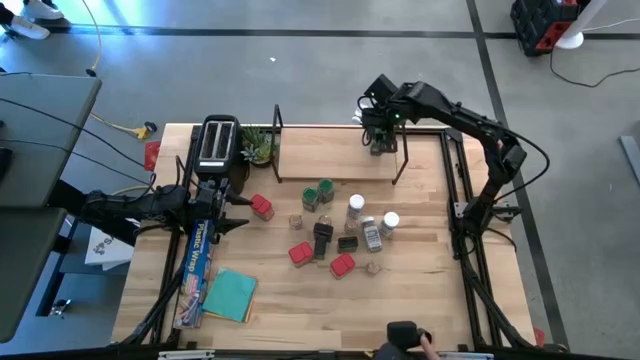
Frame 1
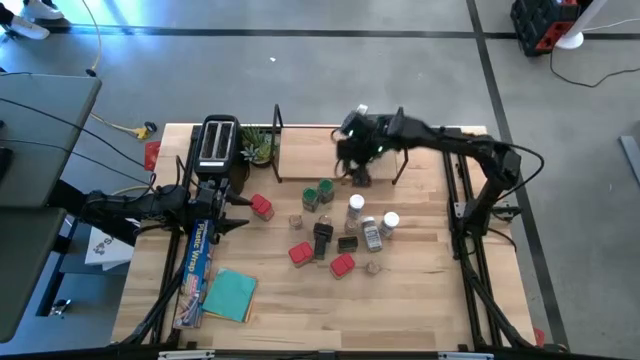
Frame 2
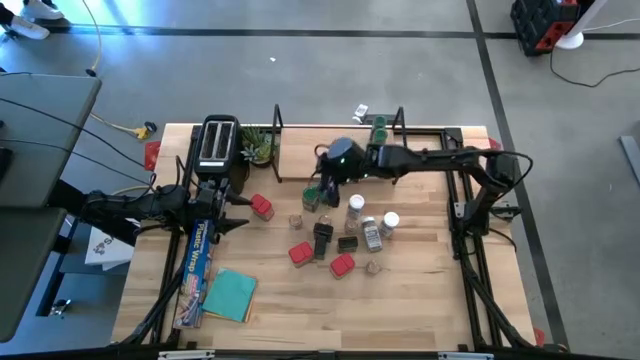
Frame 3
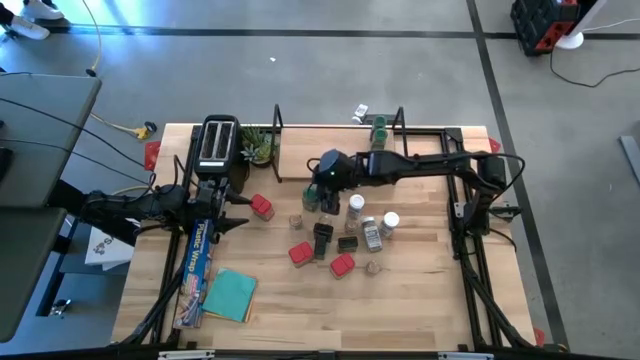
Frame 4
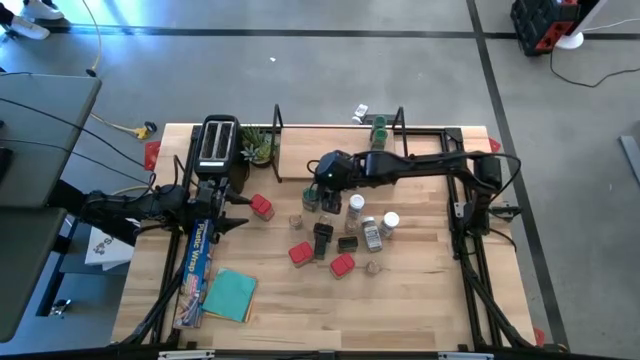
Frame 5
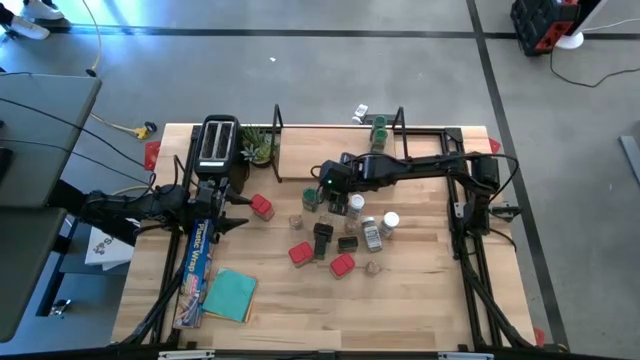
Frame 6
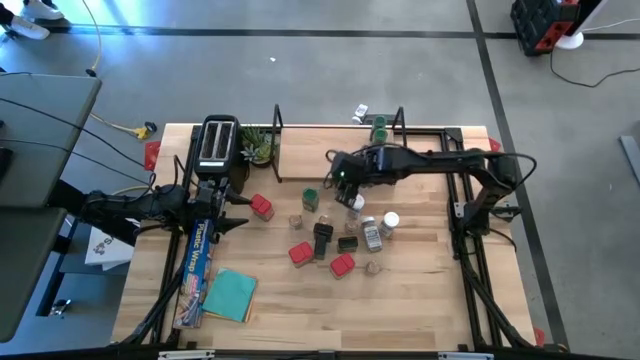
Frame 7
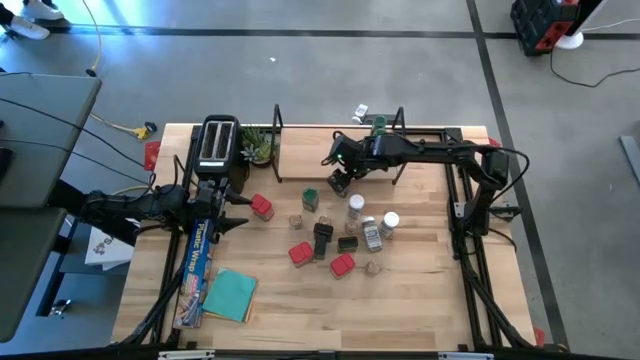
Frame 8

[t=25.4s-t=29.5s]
Task: Shelf spices
Put the top green seasoning bottle on the shelf aligned with the other green seasoning bottles

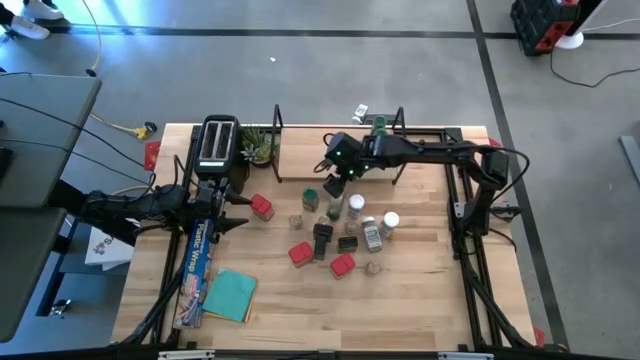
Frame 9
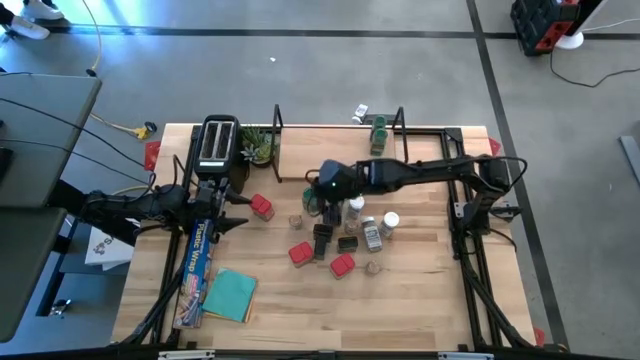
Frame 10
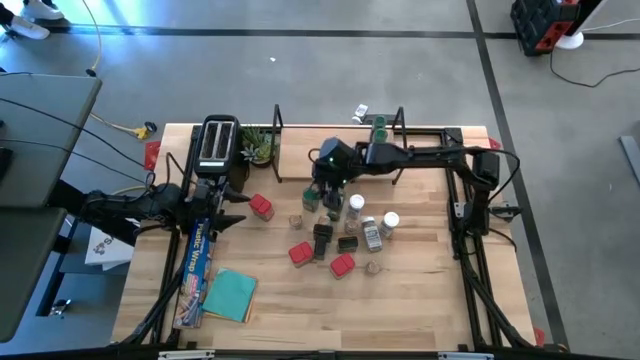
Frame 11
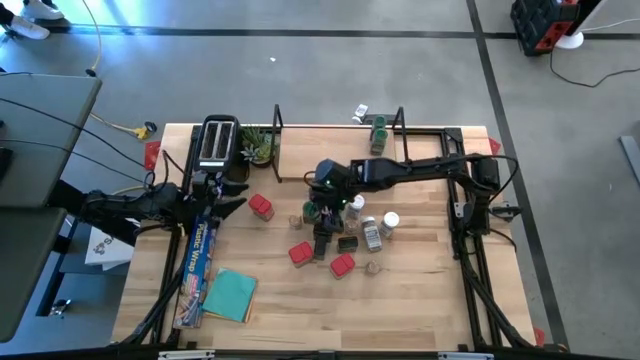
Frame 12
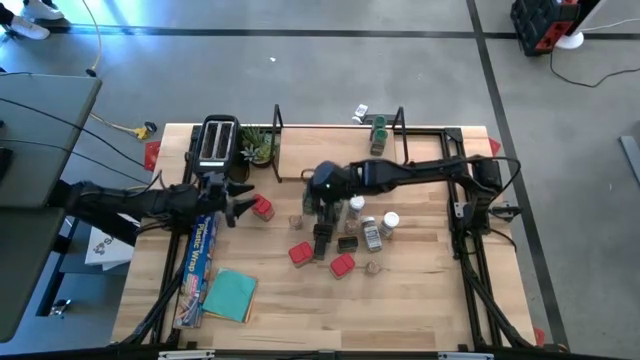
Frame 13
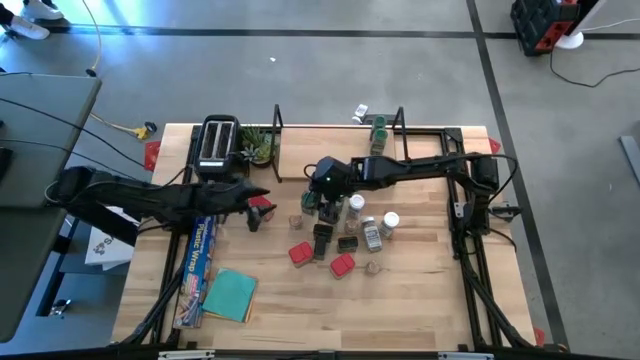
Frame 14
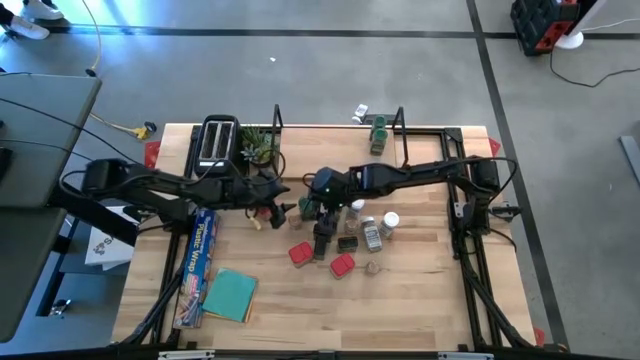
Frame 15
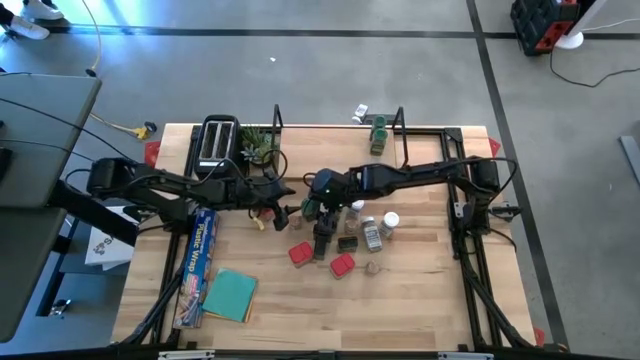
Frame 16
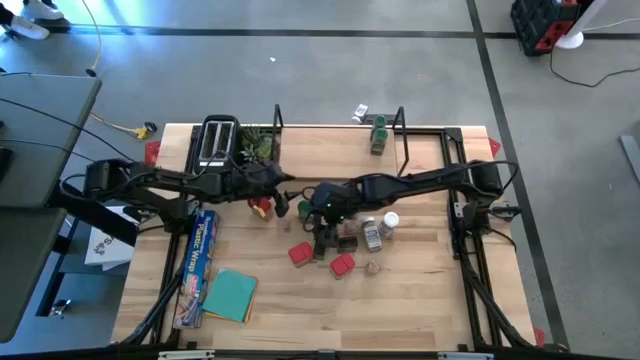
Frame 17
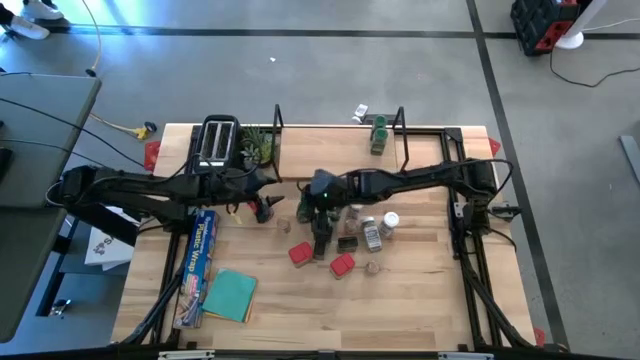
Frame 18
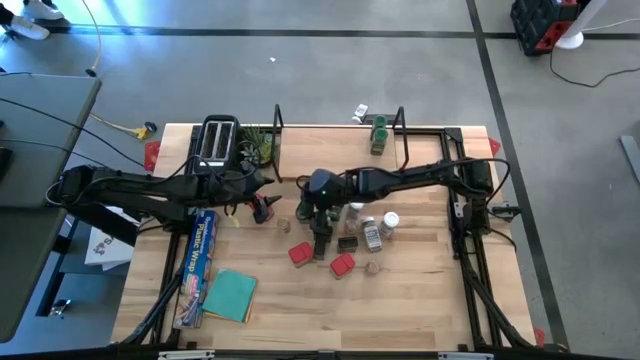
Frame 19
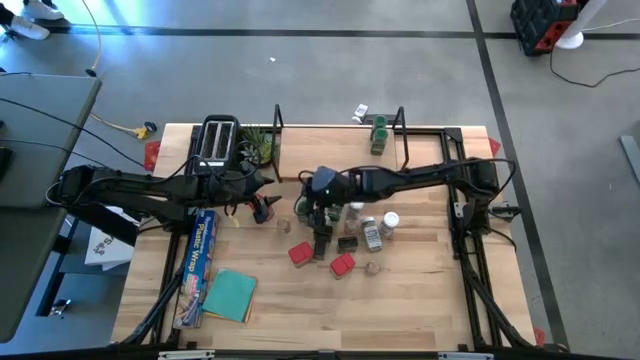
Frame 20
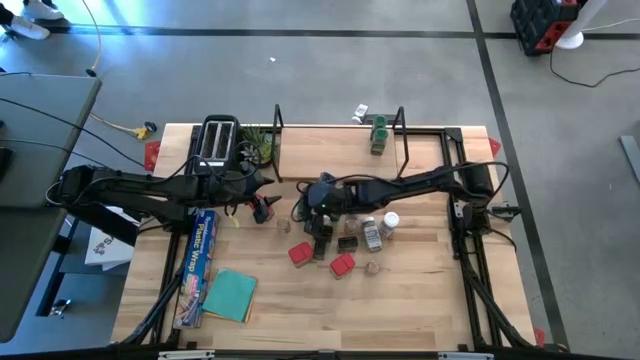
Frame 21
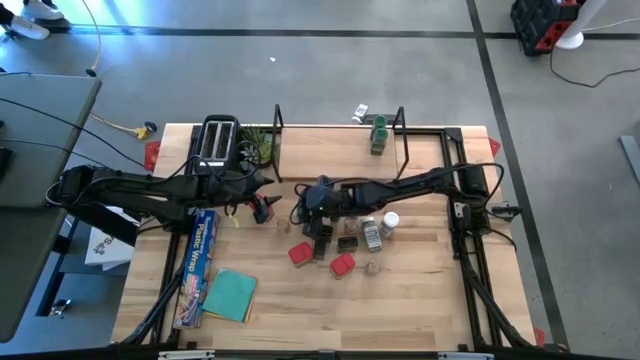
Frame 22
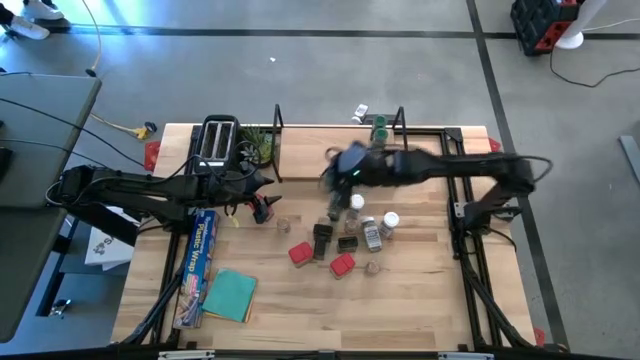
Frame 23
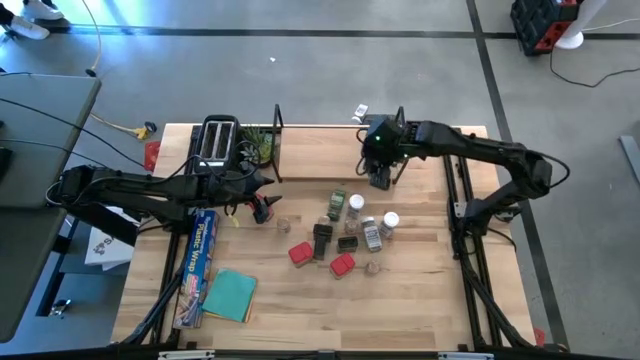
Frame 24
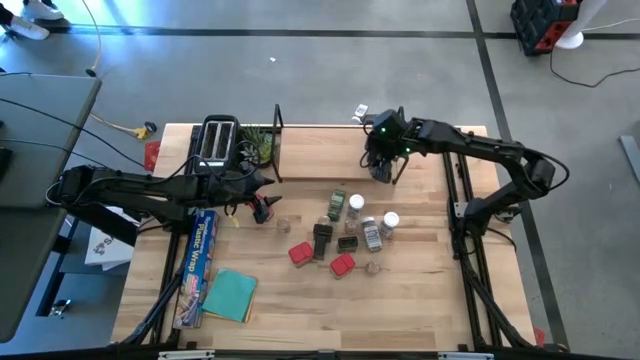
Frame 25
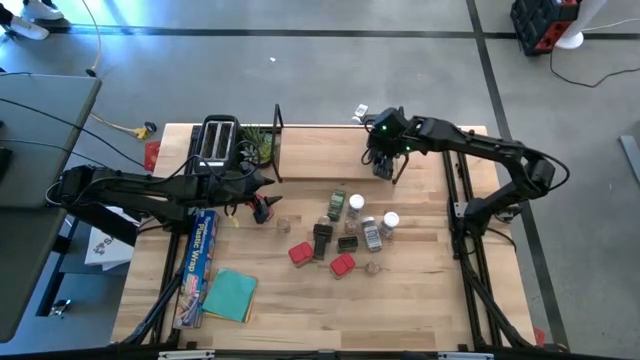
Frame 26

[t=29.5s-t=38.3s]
Put the left green seasoning bottle on the shelf aligned with the other green seasoning bottles

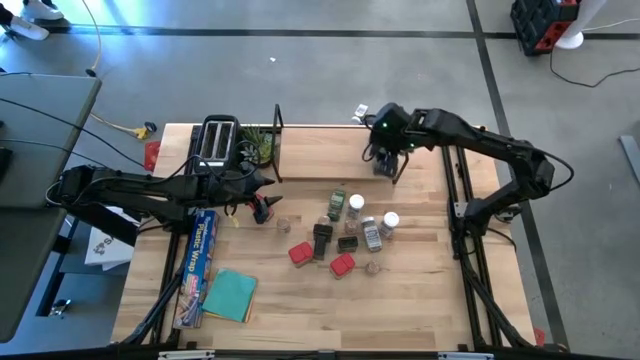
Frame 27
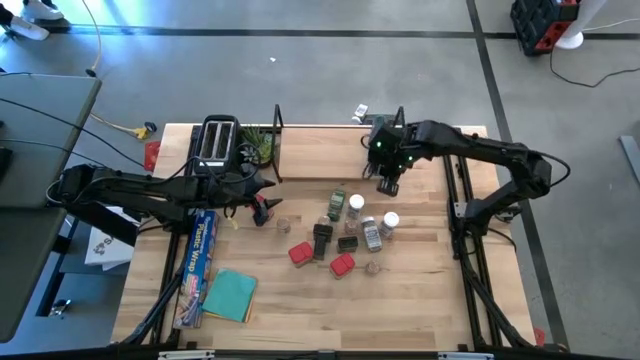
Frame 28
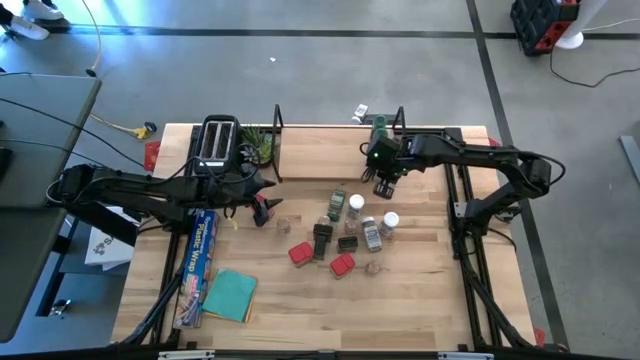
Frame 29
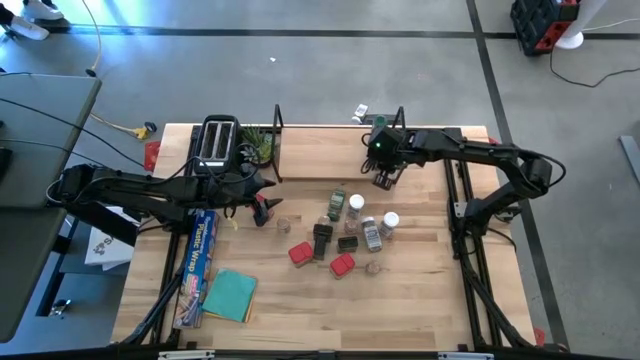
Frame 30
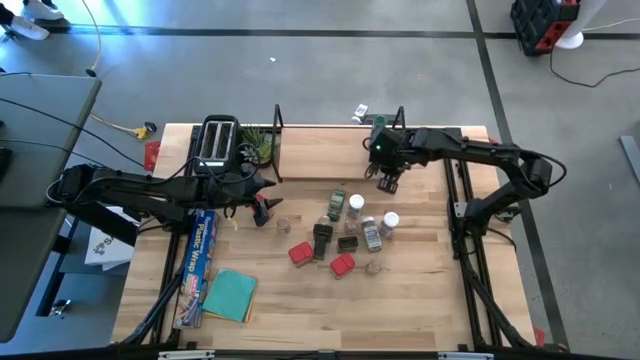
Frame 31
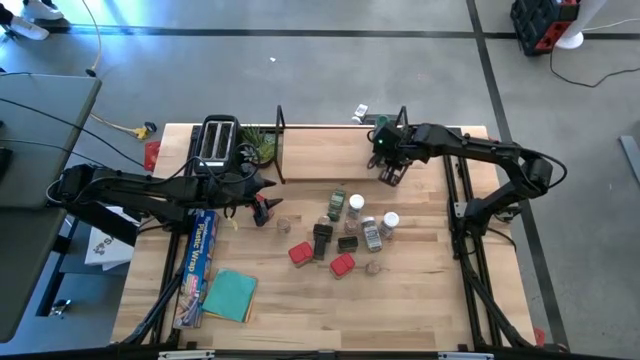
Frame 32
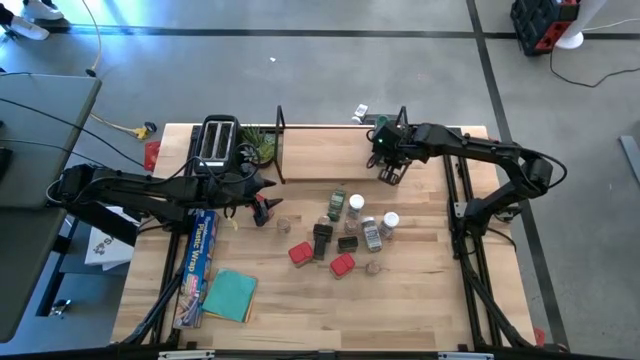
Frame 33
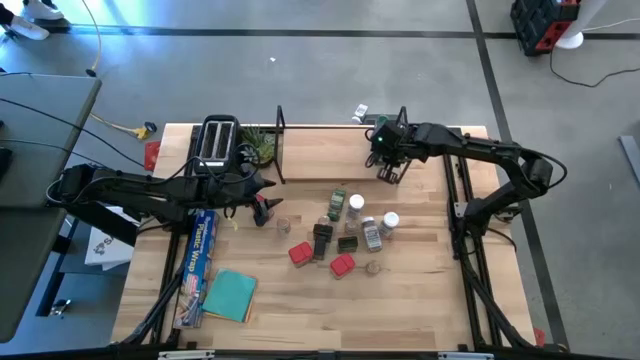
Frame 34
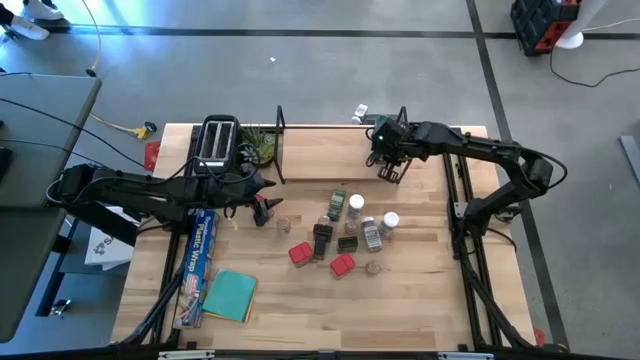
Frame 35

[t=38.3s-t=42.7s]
Adjust the green seasoning bottle

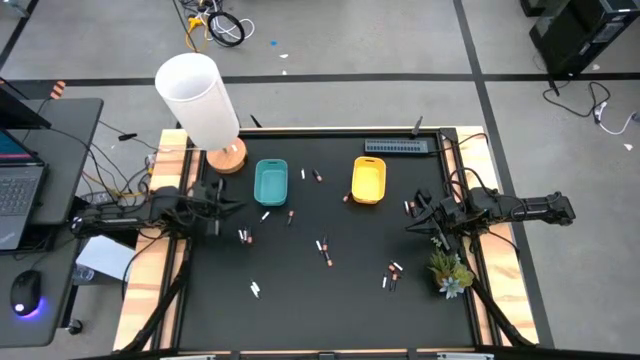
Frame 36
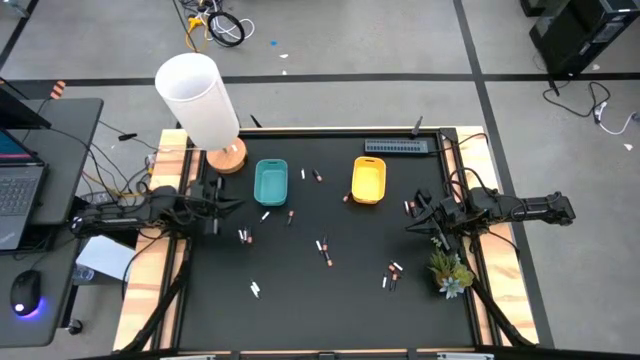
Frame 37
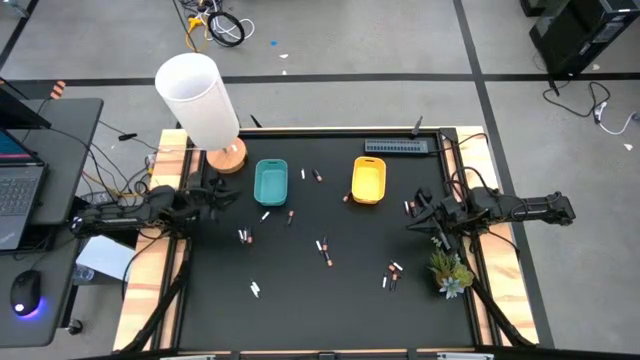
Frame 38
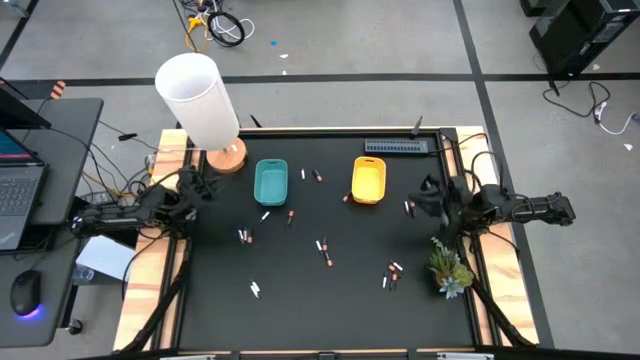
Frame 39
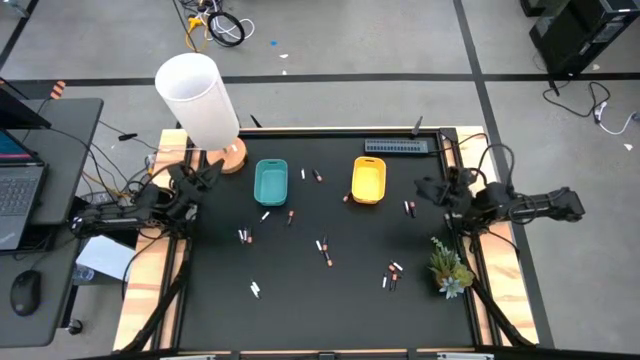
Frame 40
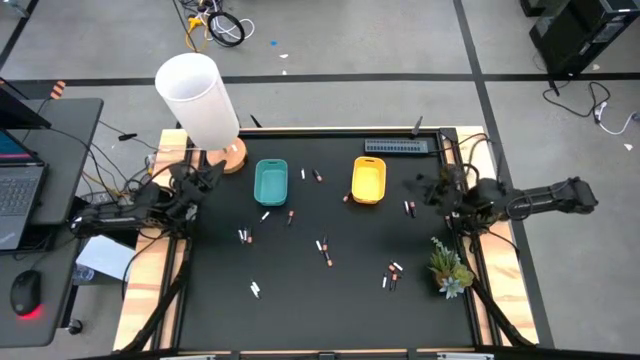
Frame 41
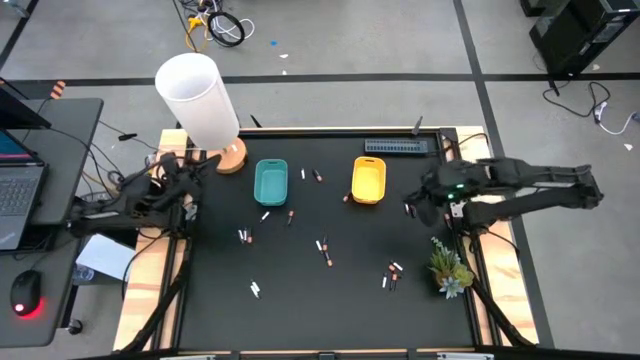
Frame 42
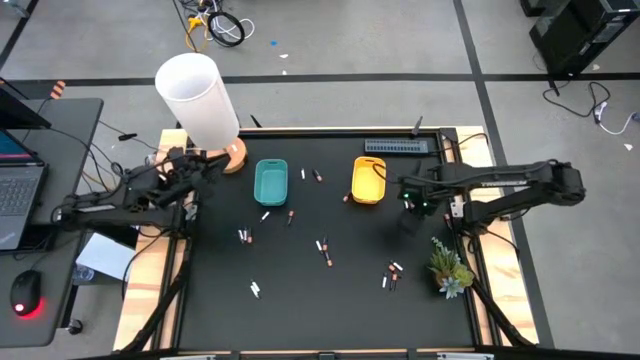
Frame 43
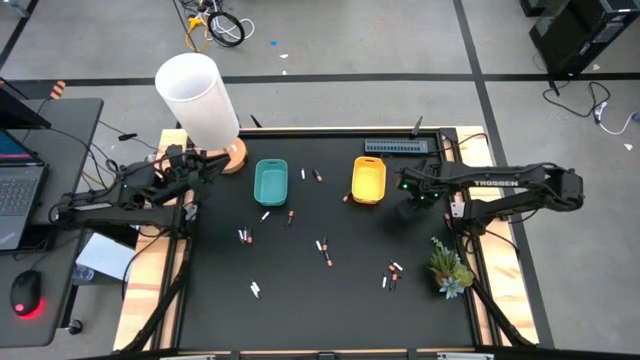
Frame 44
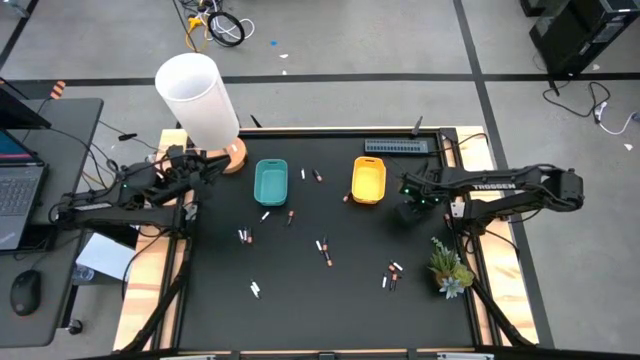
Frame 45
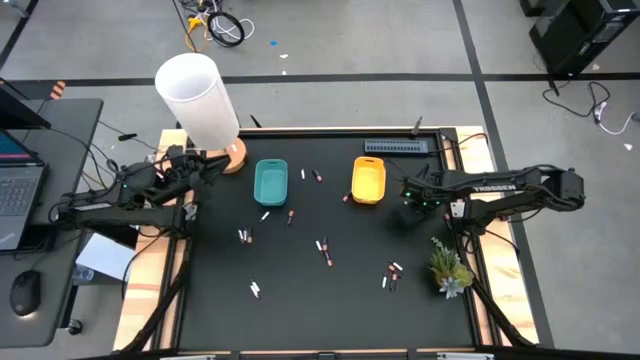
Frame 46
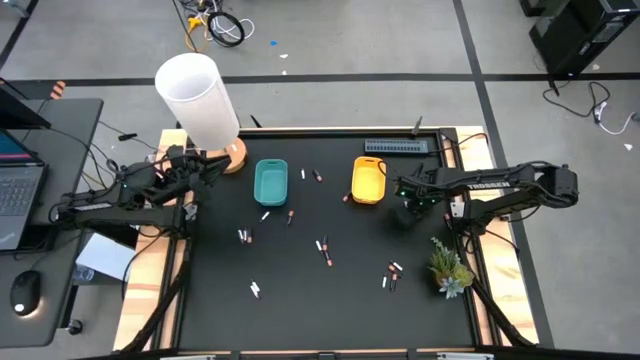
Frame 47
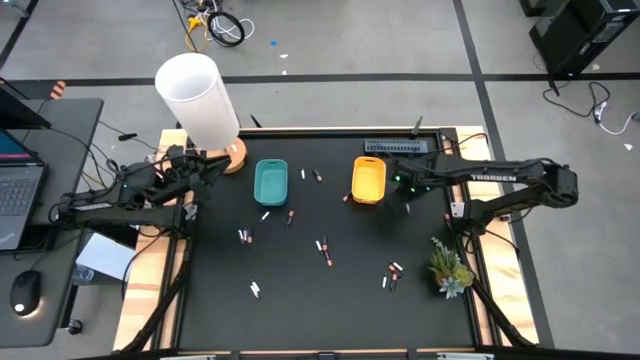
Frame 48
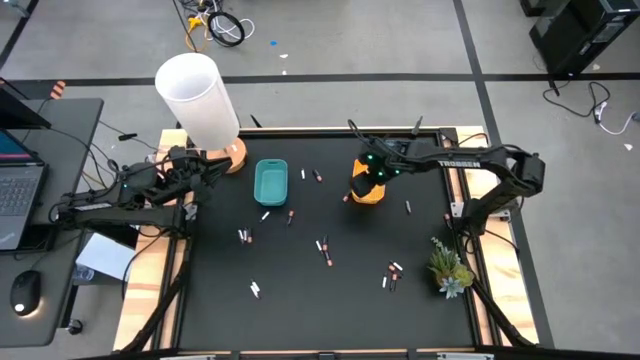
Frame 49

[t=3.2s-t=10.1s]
Task: Sort batteries
Put the black battery into the yellow bin
